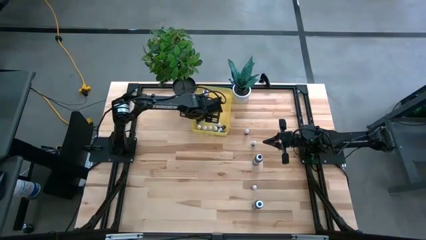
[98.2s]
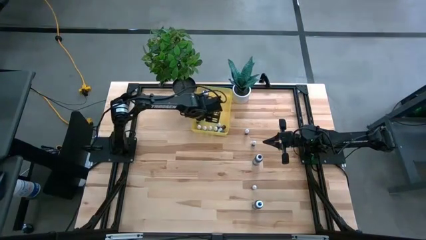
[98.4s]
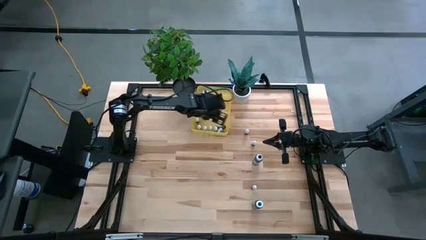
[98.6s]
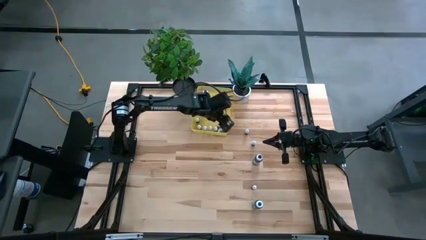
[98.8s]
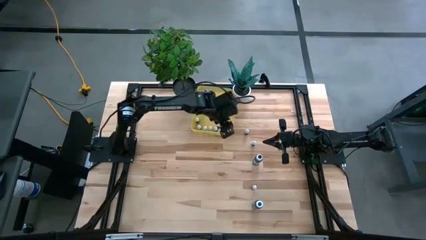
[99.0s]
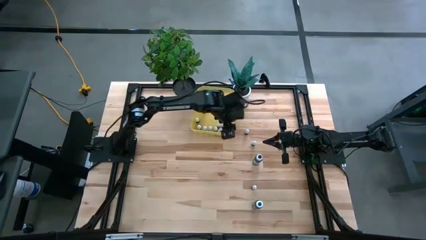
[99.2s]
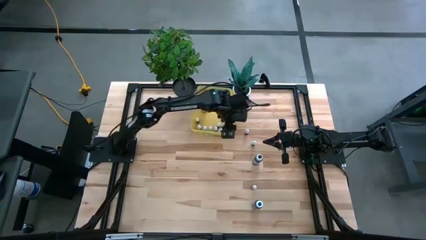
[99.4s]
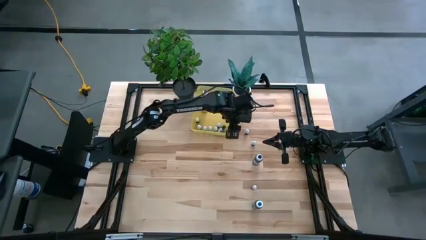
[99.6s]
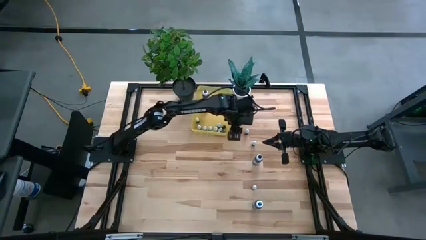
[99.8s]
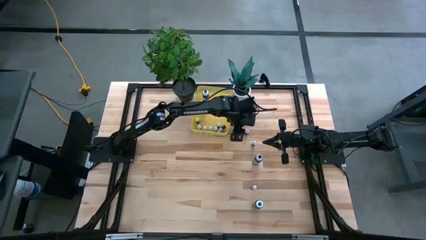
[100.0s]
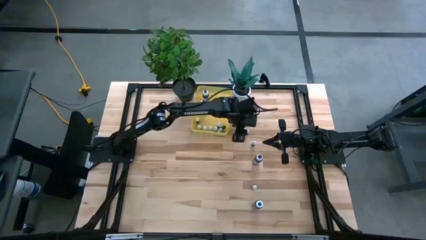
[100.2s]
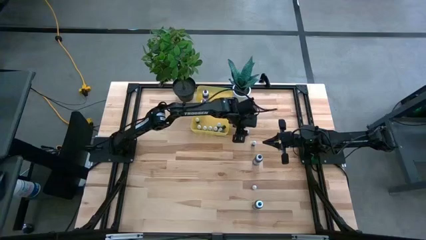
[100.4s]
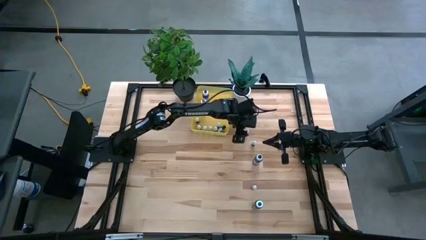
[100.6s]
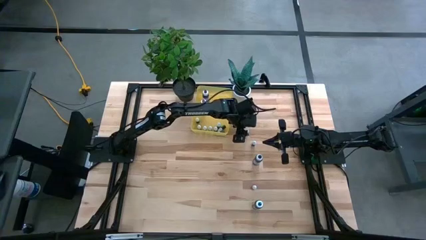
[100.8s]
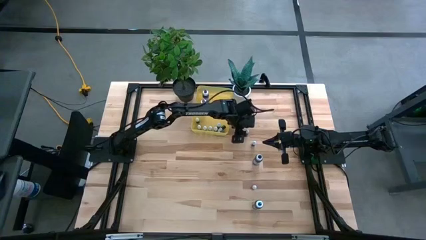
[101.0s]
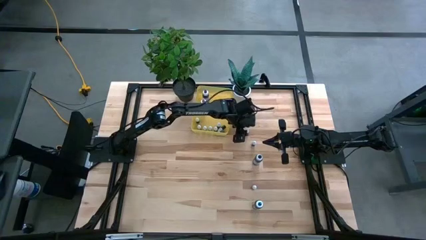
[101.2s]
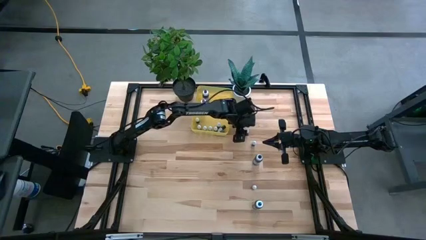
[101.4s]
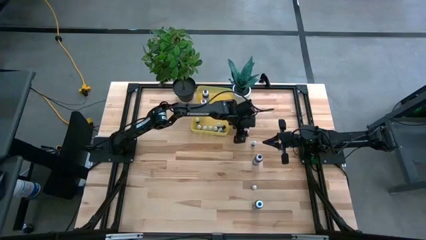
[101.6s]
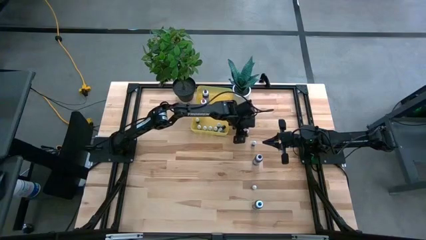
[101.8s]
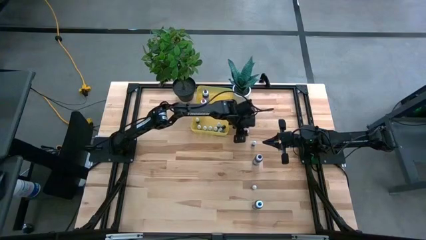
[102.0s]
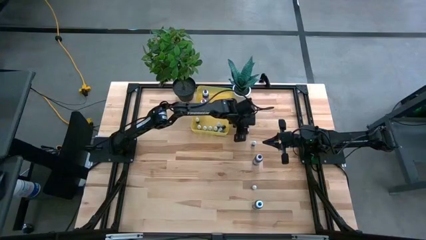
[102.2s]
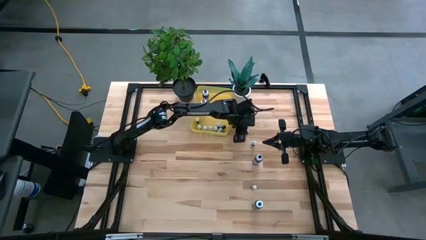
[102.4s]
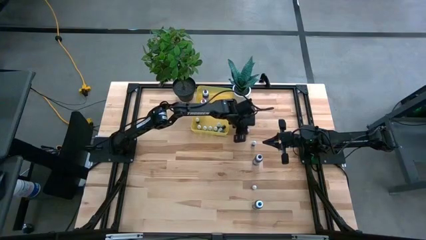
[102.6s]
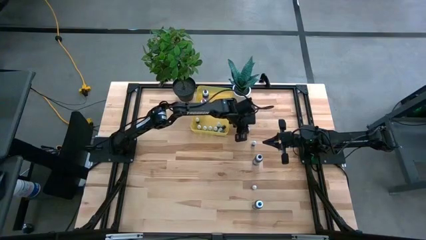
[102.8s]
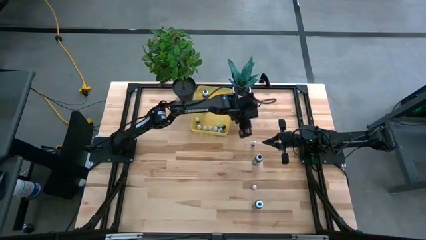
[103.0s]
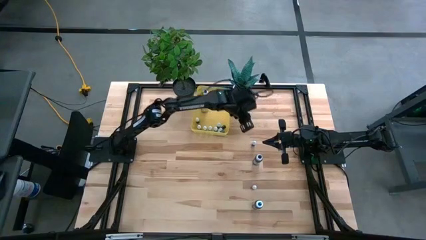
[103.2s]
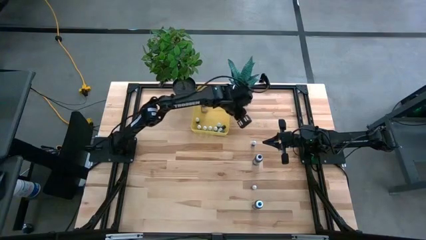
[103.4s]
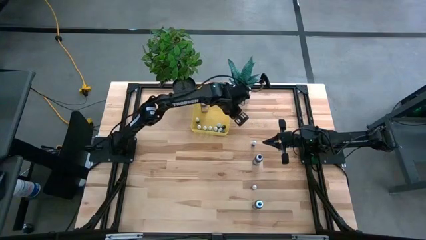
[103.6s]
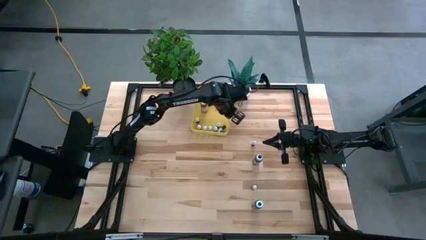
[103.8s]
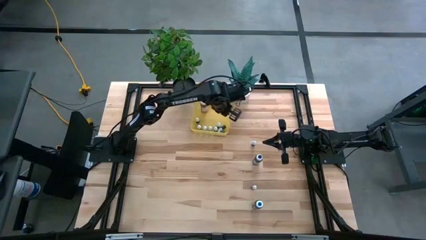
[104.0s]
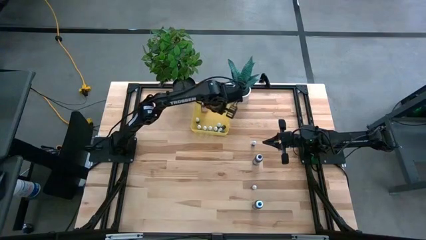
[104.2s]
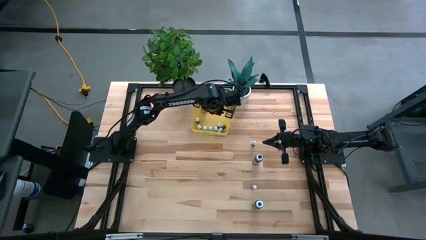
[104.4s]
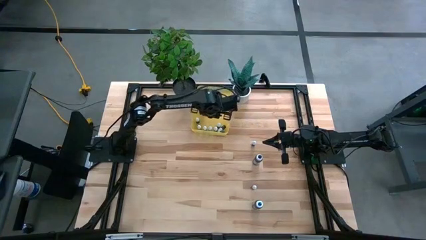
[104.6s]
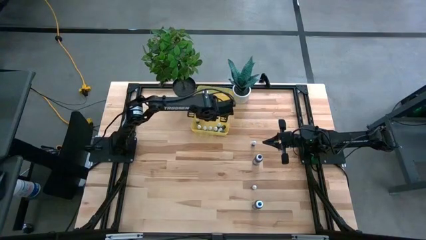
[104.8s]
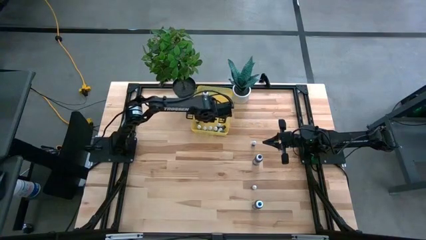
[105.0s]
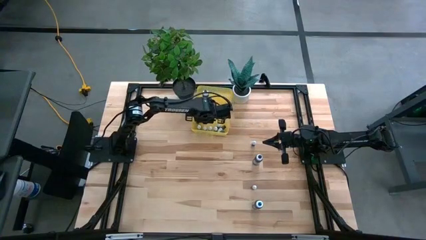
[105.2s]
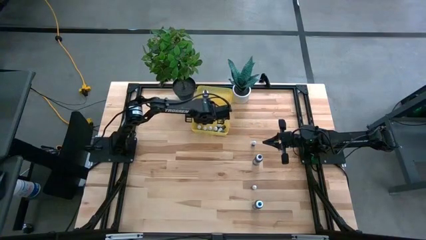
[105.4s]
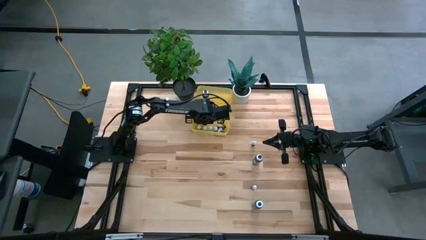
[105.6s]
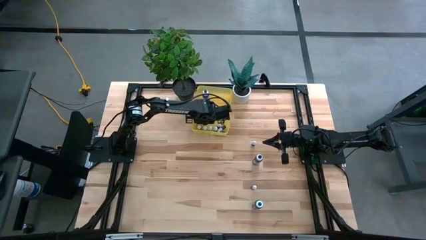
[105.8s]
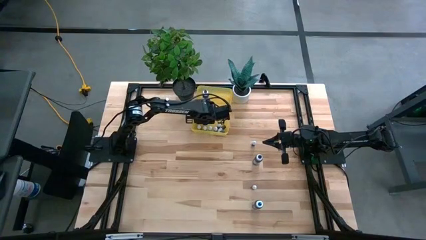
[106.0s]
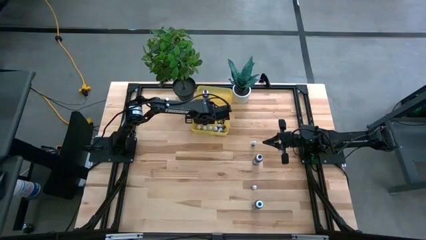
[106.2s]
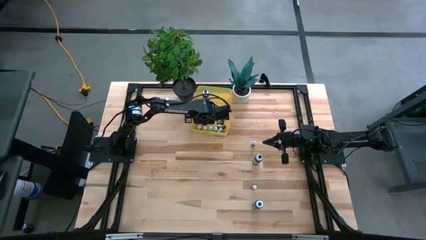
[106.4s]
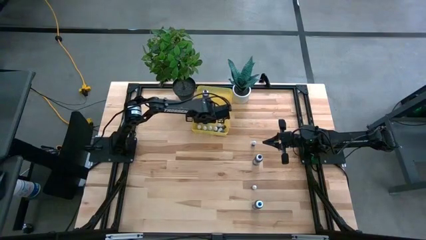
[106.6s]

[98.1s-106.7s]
Task: Pick & Place food coloring
Put the small black food coloring bottle into the yellow bin

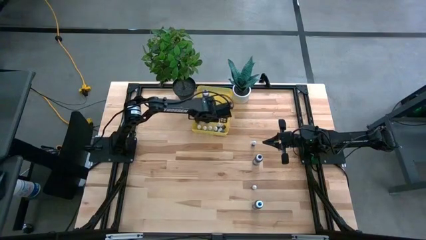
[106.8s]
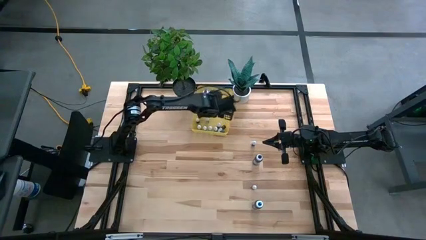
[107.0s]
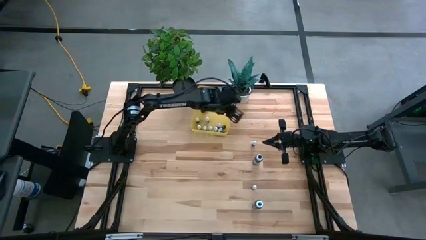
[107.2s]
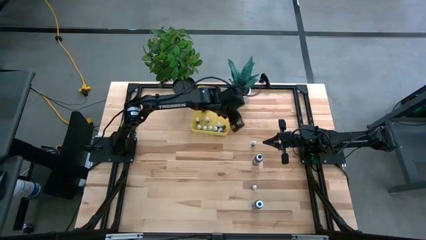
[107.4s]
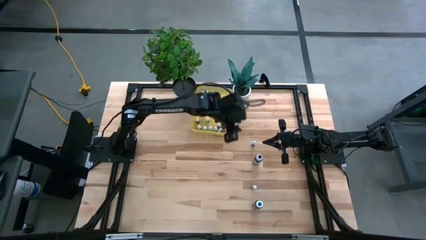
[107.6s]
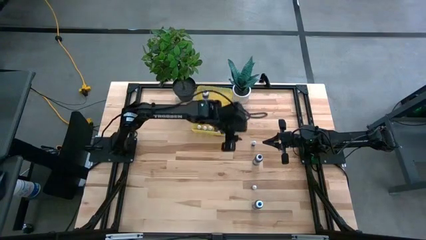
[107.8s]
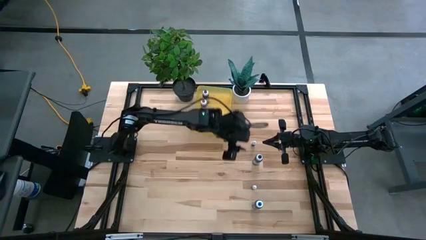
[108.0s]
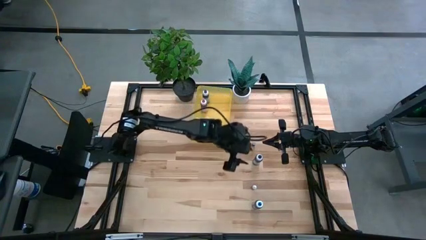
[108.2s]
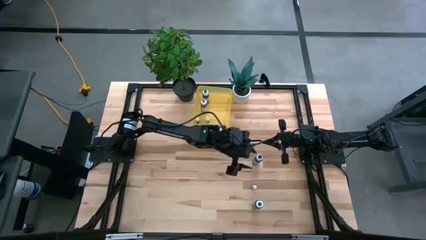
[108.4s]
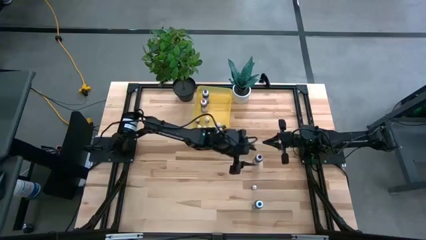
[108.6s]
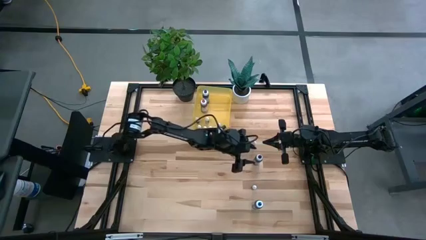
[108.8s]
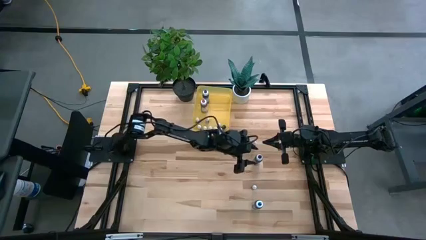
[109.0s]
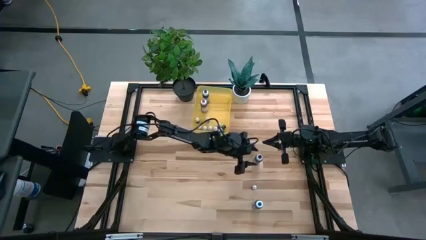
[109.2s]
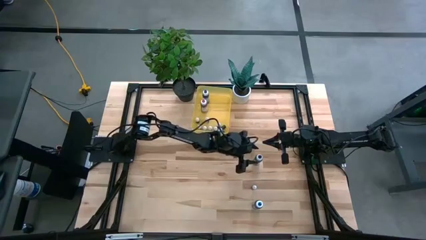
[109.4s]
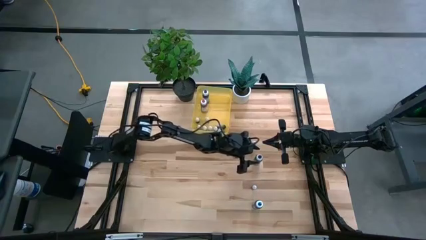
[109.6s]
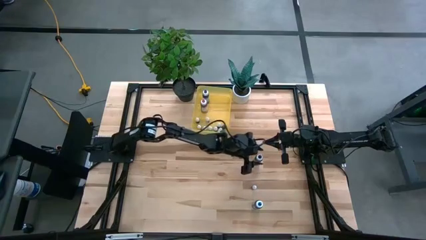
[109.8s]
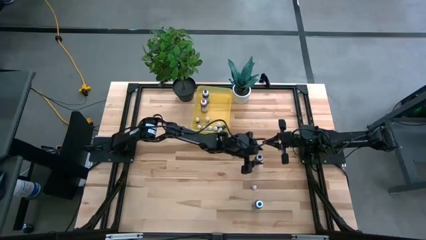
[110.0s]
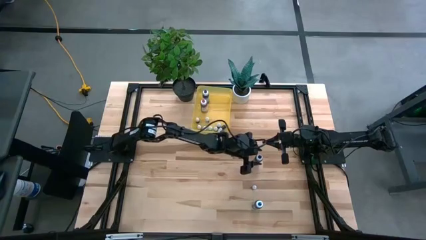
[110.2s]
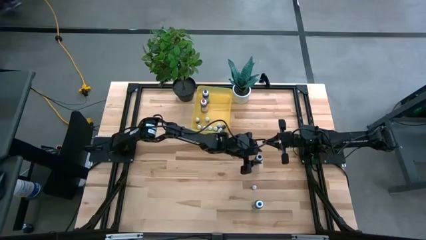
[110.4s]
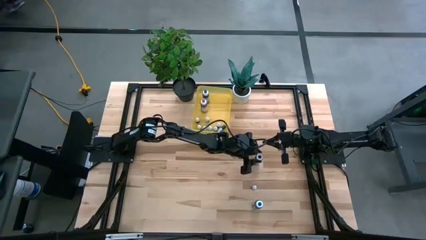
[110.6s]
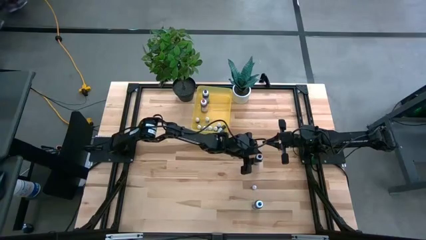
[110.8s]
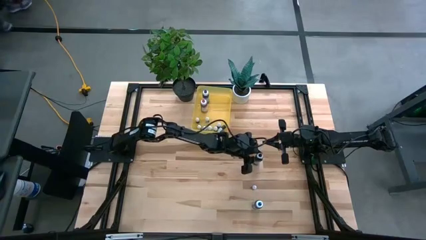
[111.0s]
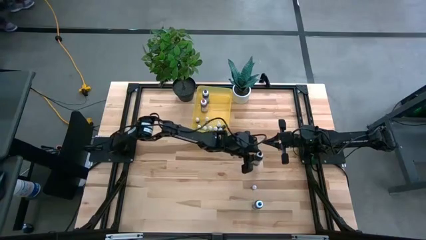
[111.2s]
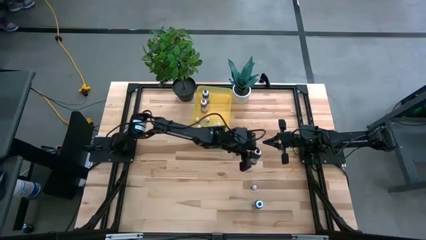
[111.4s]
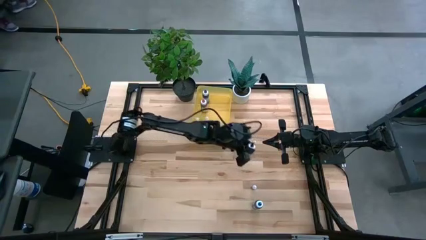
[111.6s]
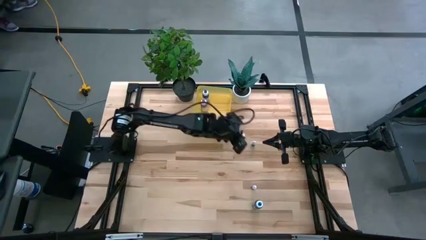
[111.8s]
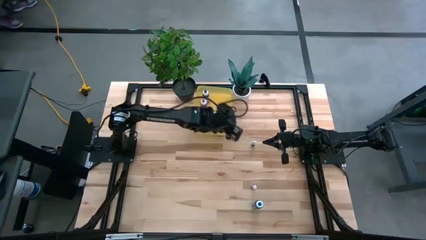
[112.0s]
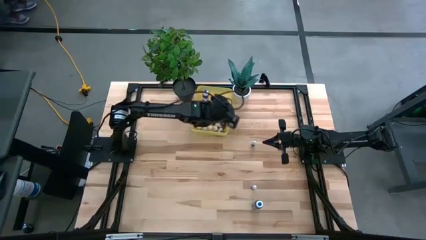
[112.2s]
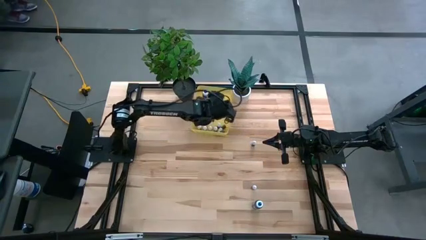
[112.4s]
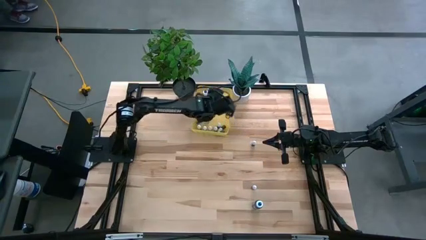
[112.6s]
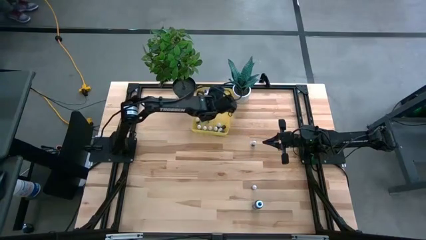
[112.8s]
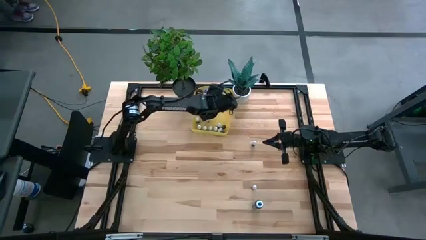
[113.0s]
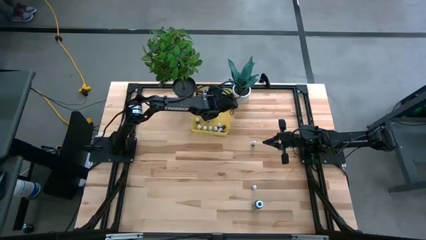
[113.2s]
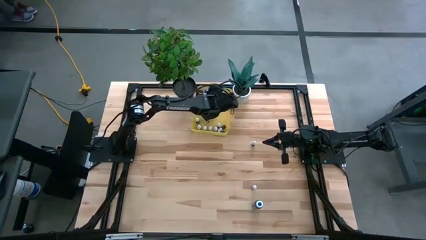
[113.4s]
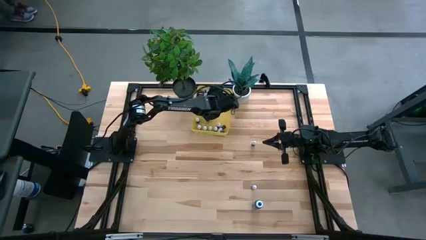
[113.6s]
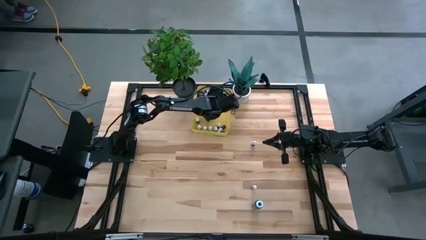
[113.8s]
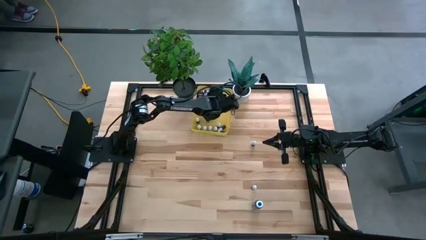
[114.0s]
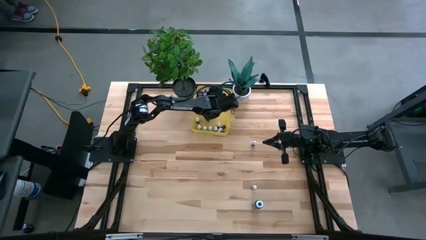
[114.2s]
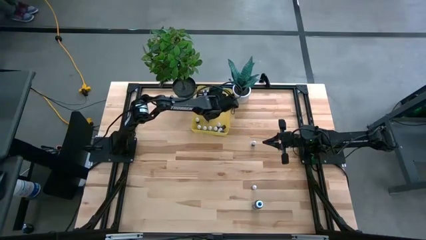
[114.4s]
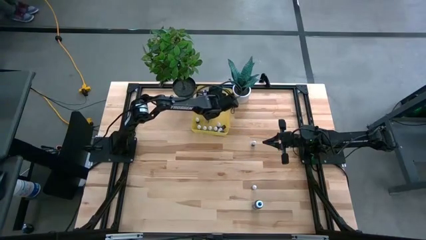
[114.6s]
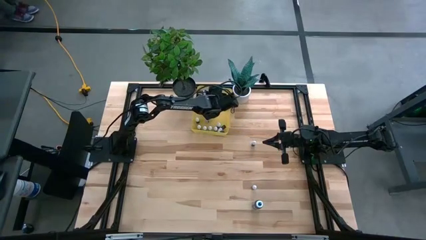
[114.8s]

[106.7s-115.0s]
Put the large black food coloring bottle into the yellow bin
